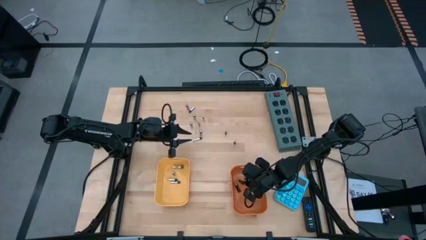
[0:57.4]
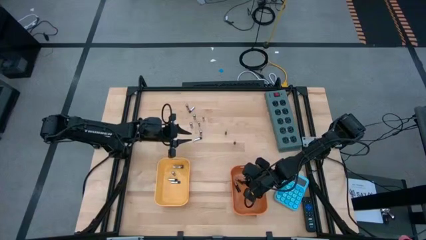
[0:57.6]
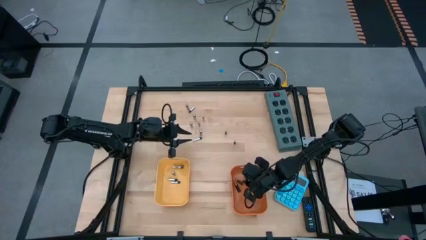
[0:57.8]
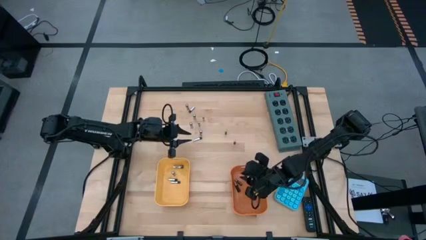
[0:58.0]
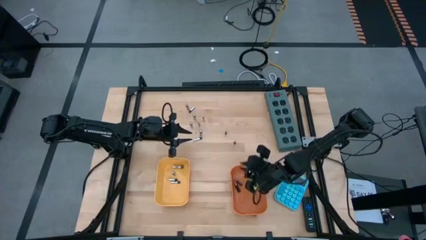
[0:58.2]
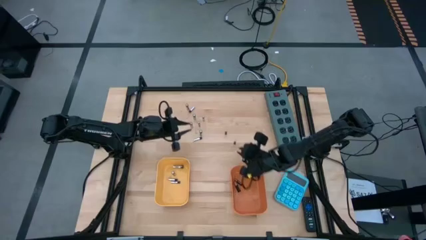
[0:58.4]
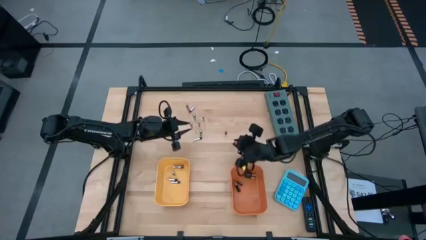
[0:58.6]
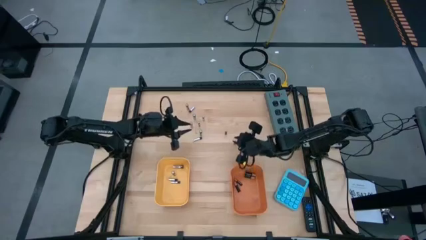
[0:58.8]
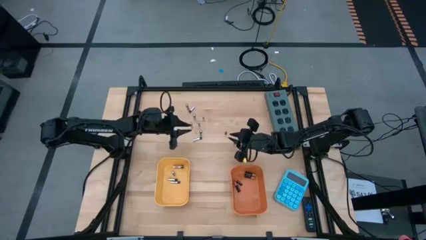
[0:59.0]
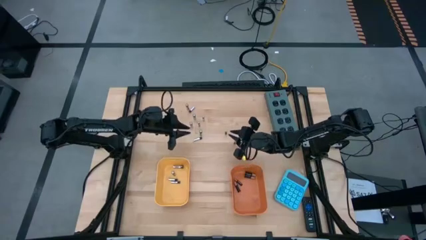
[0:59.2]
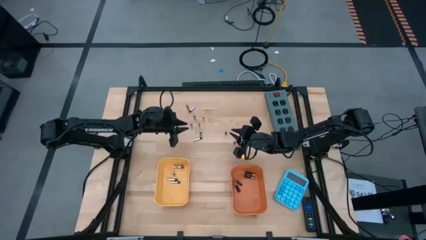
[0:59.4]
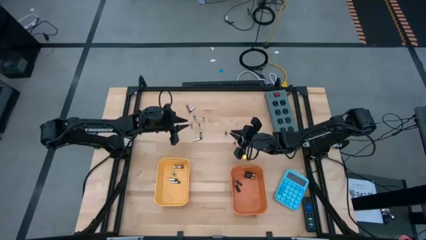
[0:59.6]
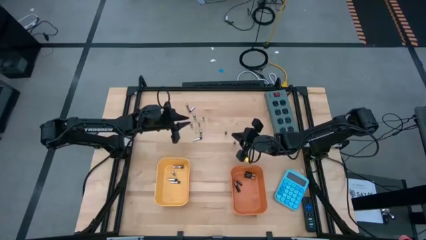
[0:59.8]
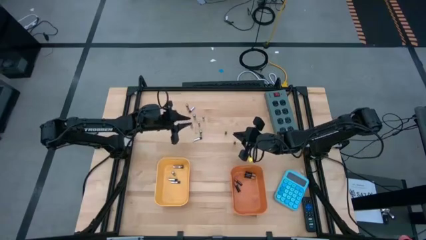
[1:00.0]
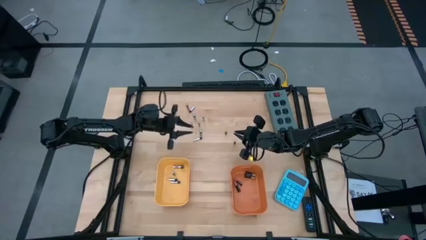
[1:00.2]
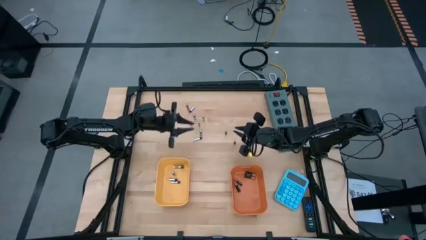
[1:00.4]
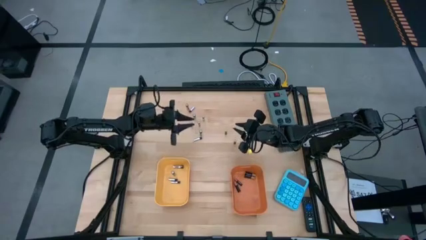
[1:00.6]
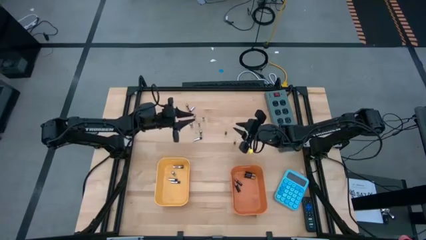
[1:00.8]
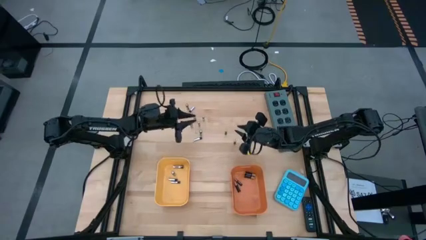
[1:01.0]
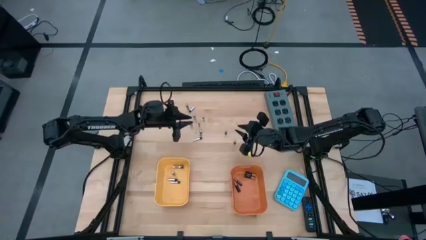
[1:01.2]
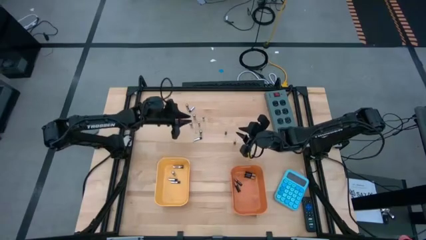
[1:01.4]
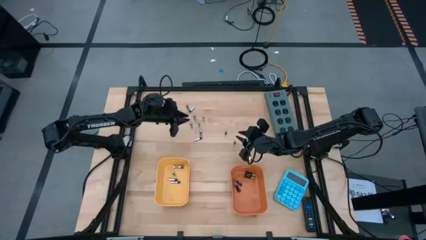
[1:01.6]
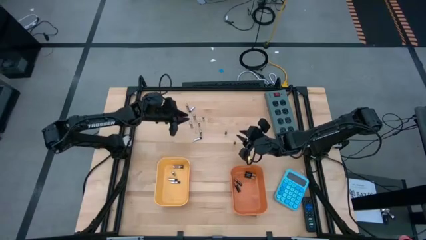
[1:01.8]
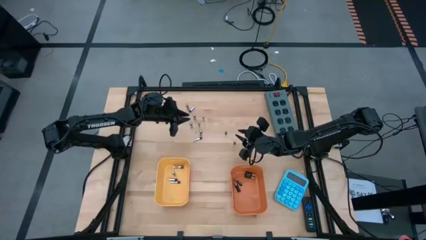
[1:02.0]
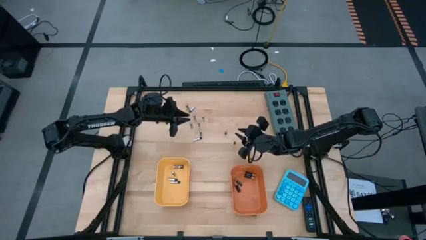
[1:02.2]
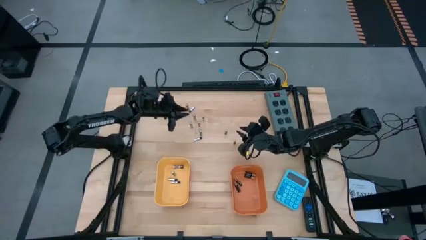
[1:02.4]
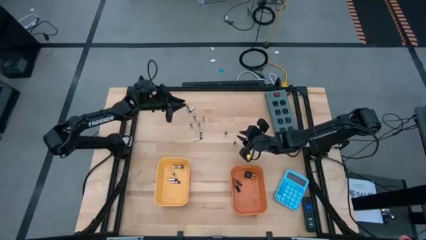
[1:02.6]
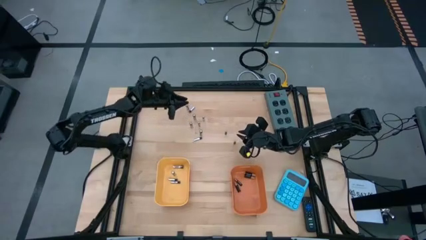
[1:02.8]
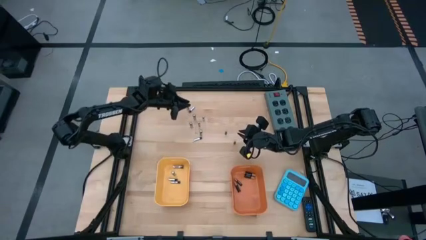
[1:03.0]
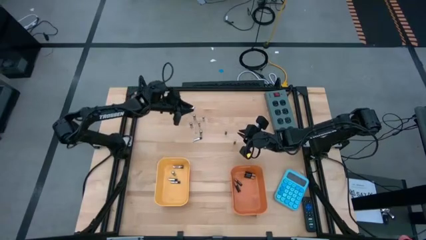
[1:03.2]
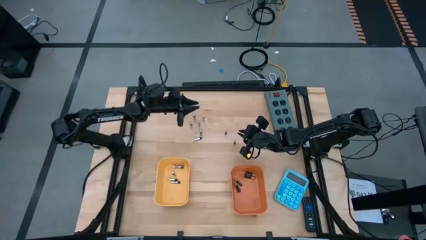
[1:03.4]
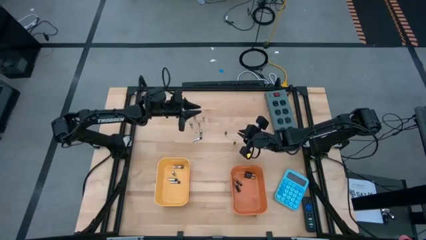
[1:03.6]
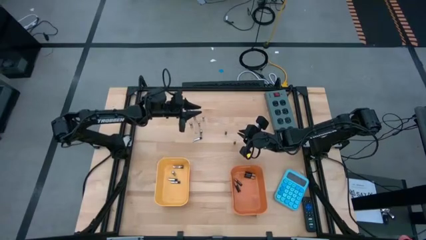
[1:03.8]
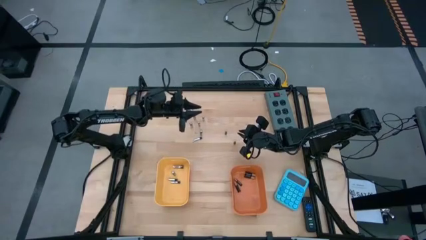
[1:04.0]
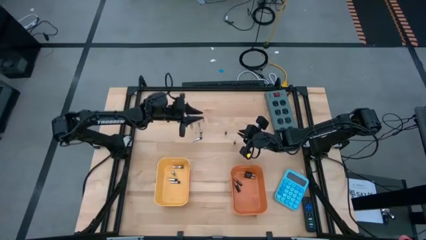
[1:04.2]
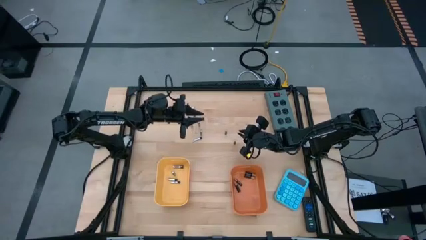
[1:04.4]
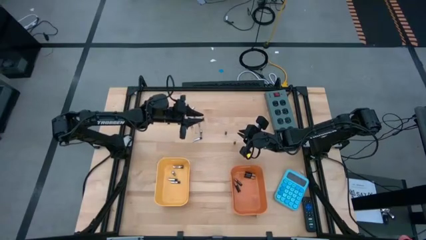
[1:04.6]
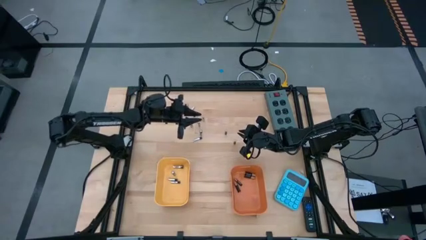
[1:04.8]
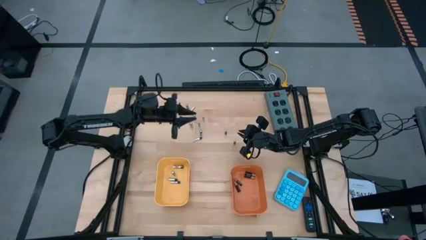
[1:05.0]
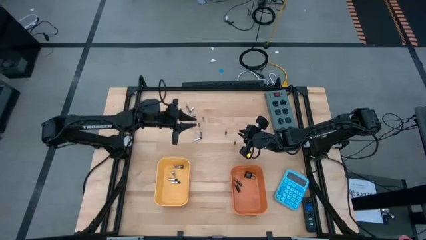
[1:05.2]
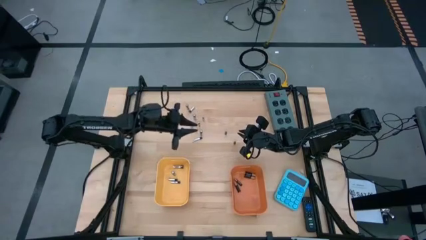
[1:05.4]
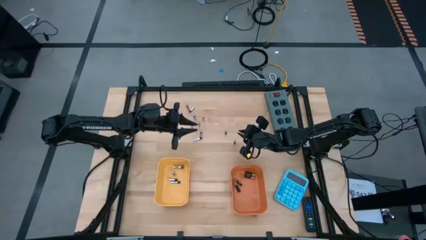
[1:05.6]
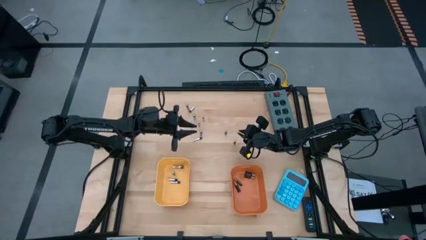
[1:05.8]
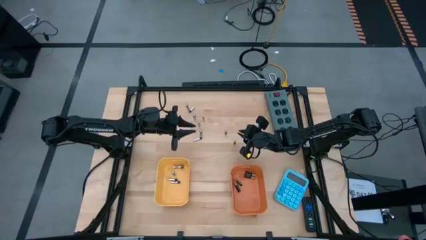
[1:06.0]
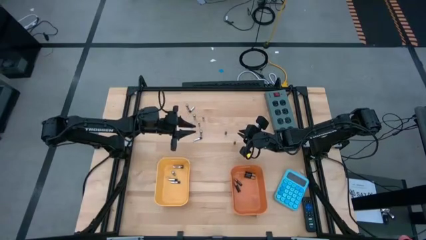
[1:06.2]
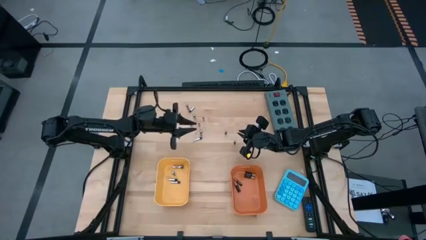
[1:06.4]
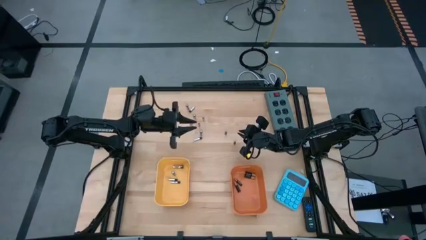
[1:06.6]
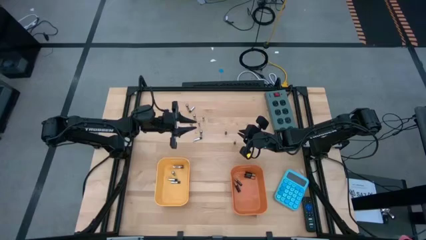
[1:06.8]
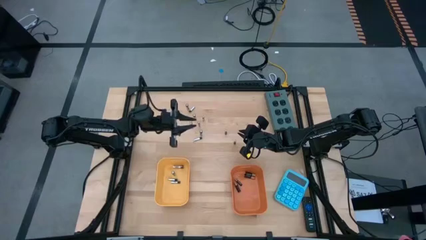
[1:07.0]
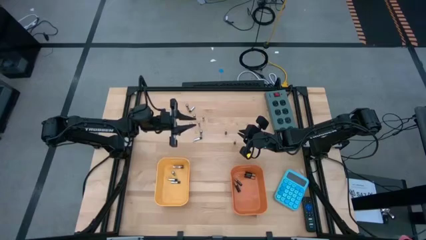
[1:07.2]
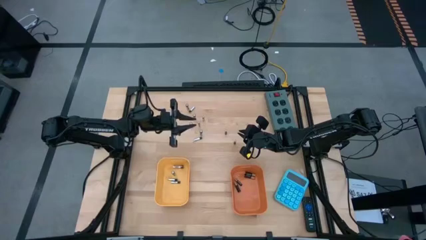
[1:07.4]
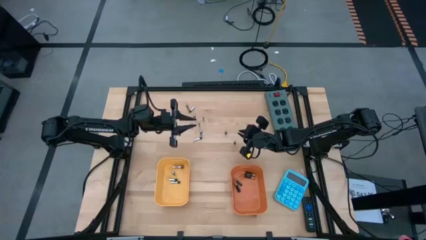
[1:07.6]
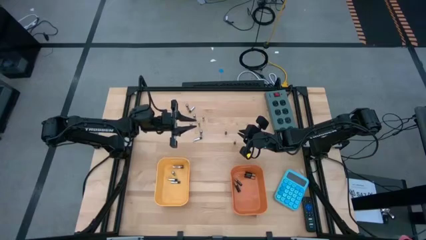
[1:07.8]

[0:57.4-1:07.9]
Task: Sort batteries
Put the silver battery into the yellow bin

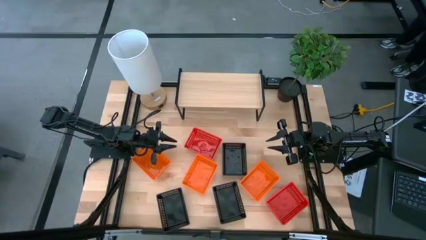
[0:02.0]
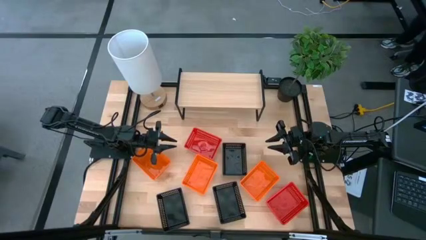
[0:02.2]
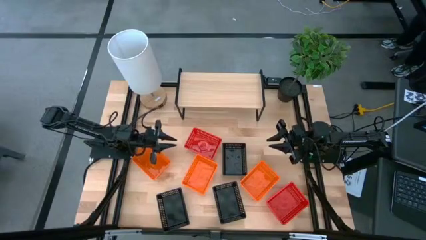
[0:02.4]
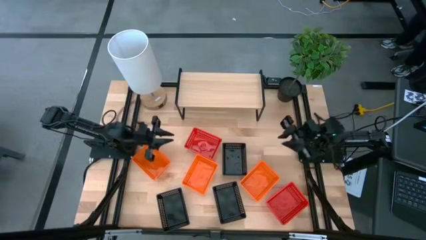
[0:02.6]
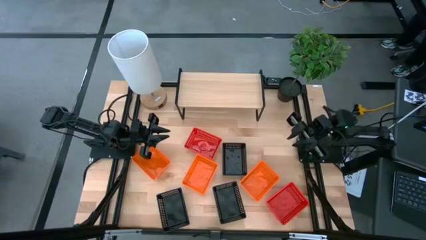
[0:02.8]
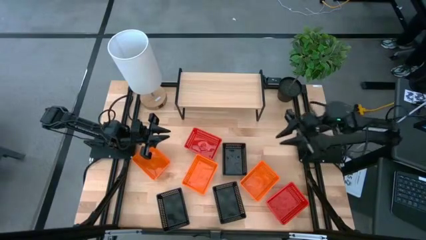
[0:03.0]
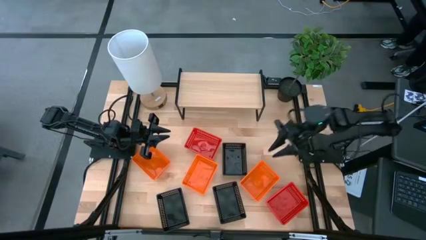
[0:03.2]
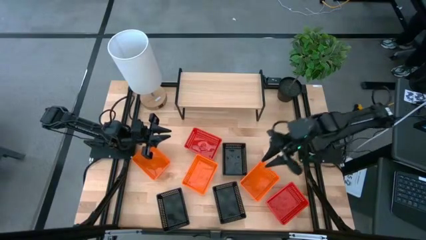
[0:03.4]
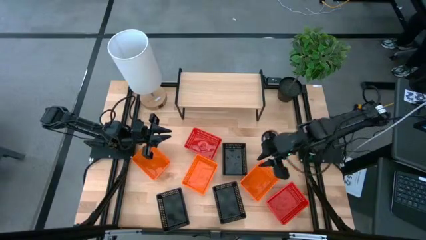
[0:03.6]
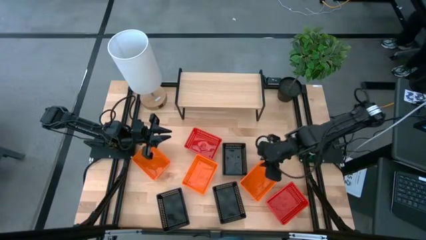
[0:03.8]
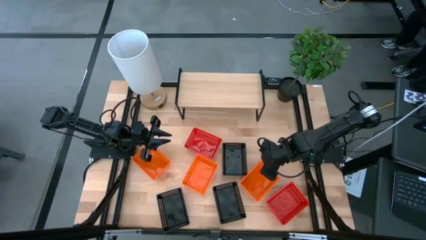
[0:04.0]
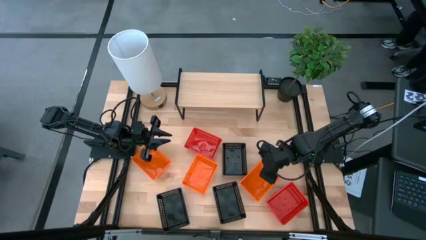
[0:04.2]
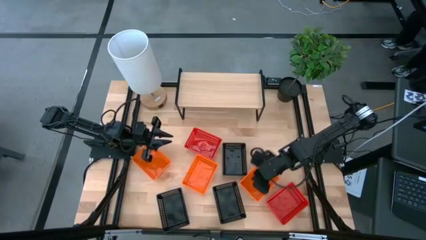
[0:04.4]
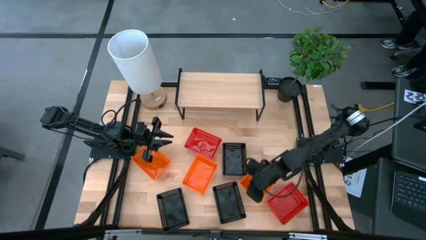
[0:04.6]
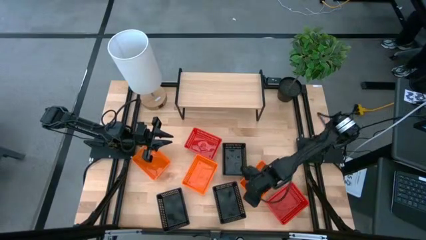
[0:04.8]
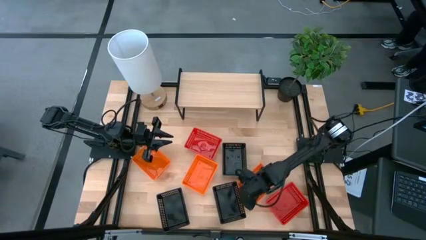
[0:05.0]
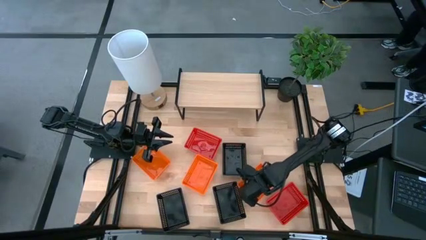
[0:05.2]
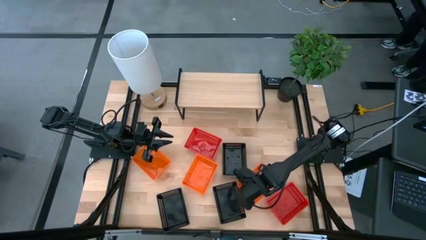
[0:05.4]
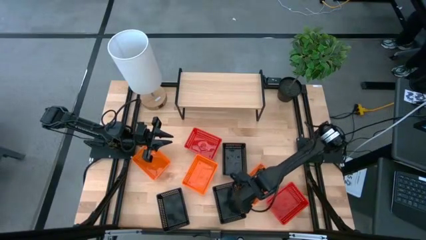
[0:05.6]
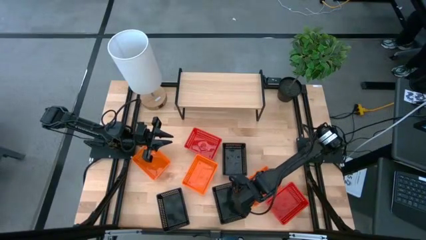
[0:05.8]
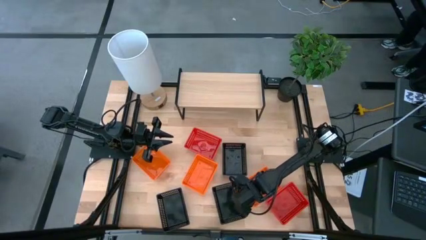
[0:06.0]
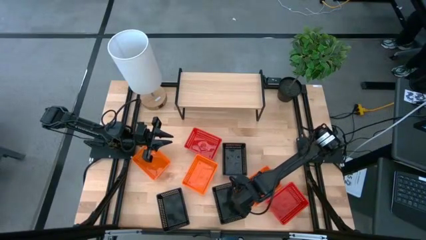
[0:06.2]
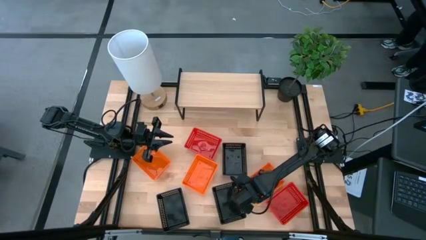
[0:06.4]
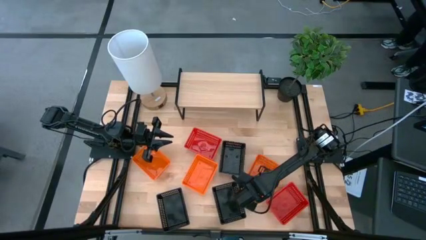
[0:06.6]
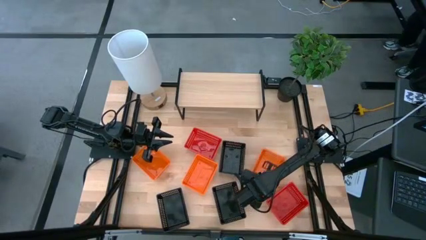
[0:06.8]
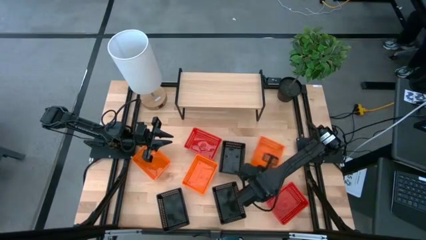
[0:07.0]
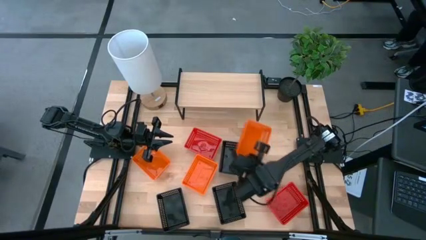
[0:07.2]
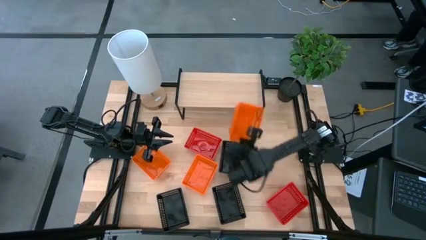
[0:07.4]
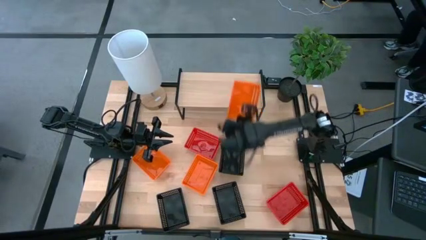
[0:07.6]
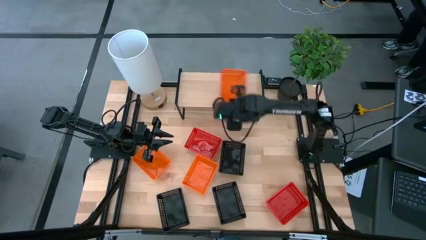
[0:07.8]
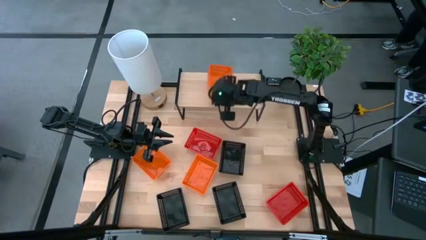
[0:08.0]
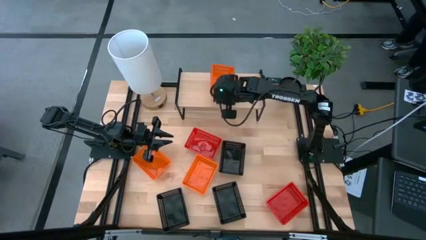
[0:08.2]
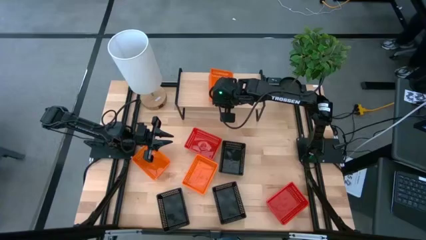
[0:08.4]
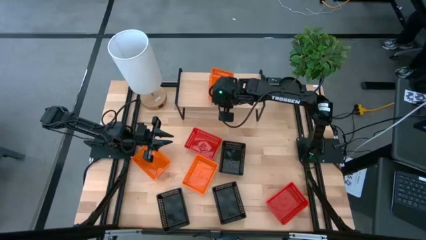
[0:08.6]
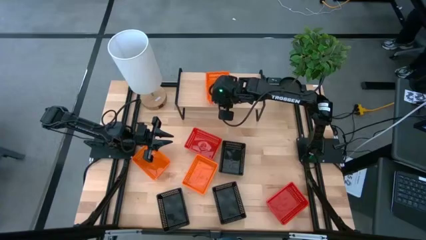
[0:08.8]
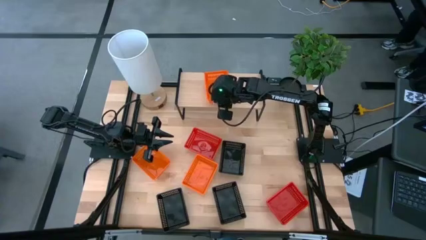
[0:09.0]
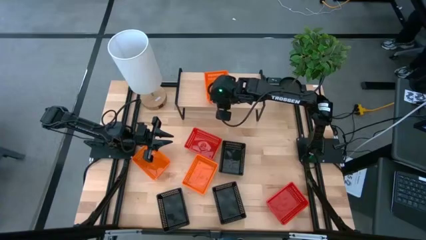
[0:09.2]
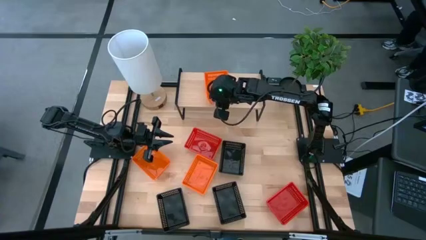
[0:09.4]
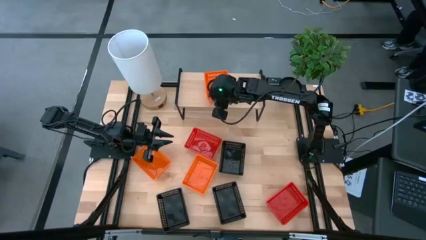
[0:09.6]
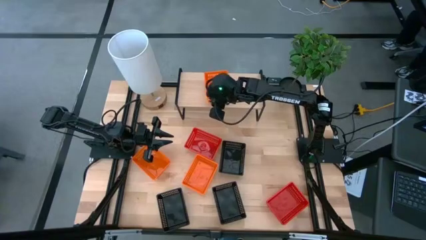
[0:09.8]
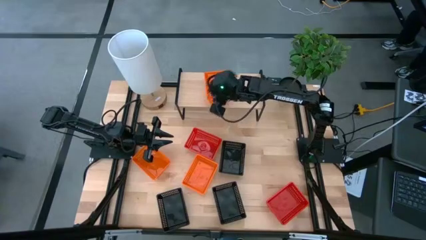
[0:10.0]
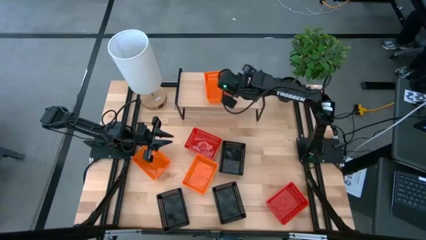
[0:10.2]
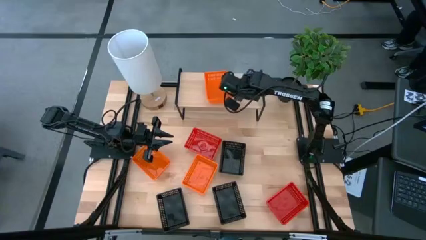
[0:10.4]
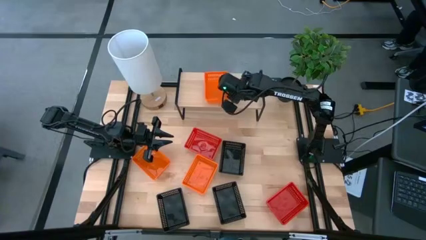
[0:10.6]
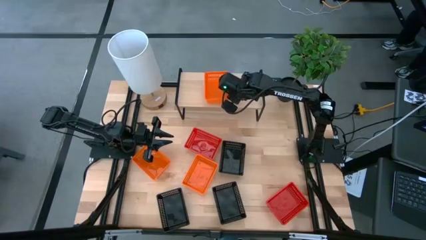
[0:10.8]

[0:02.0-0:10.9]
Task: Stack baskets on shelf by color
Put the right orange basket on the shelf
